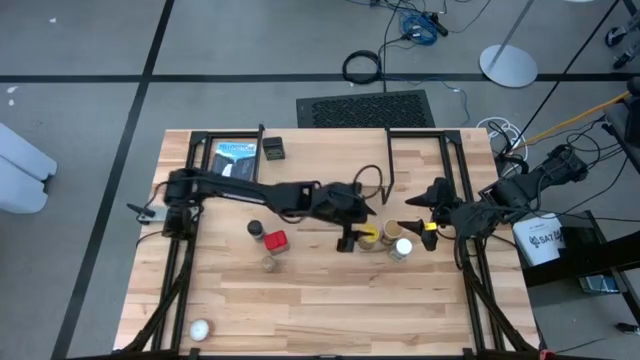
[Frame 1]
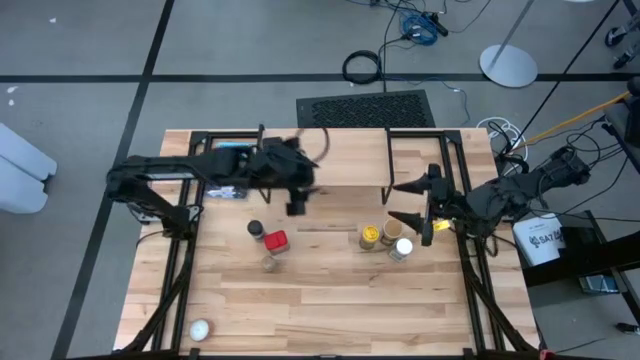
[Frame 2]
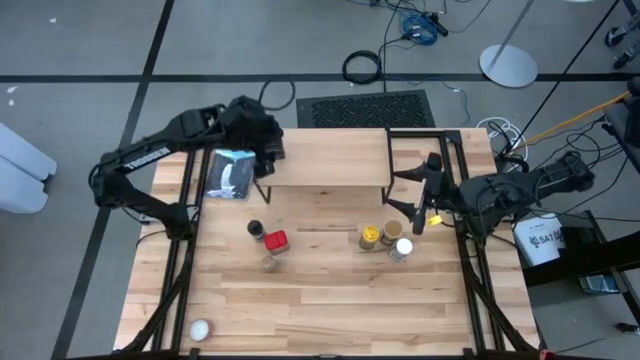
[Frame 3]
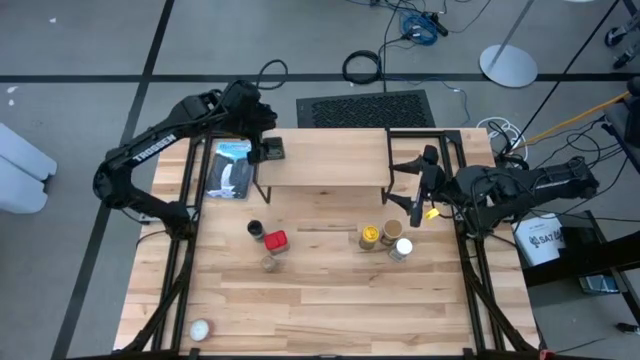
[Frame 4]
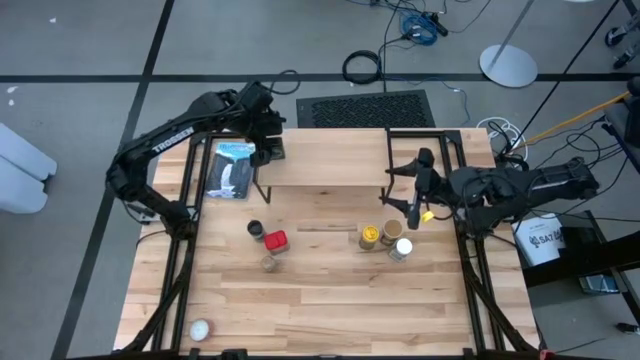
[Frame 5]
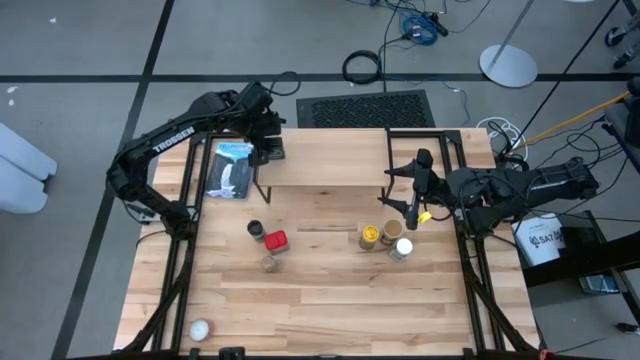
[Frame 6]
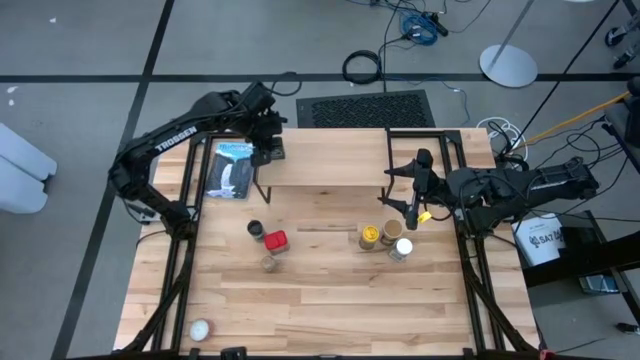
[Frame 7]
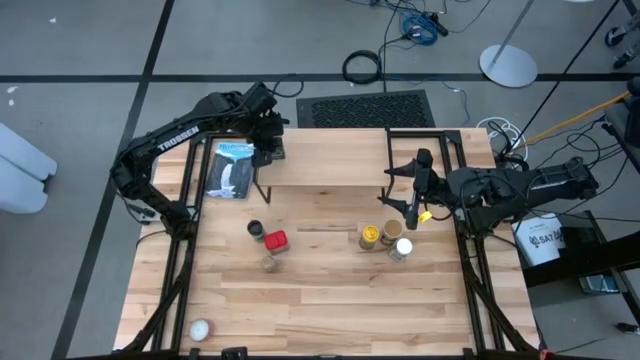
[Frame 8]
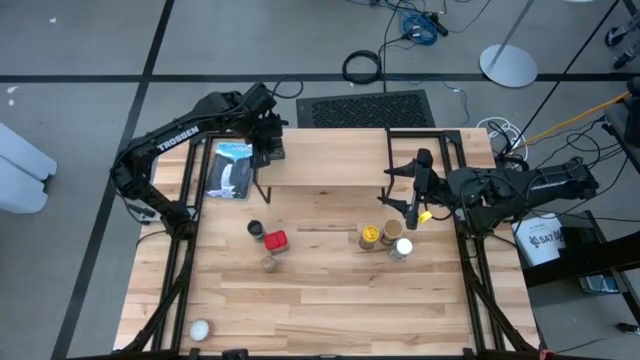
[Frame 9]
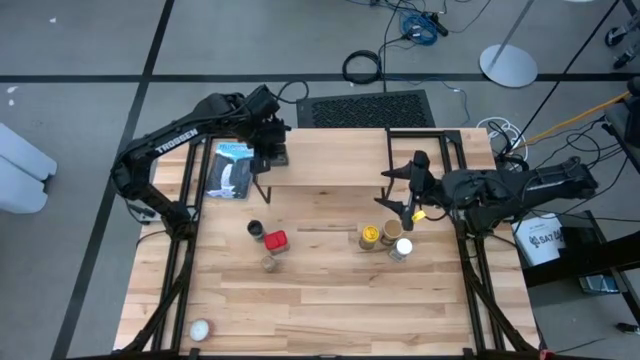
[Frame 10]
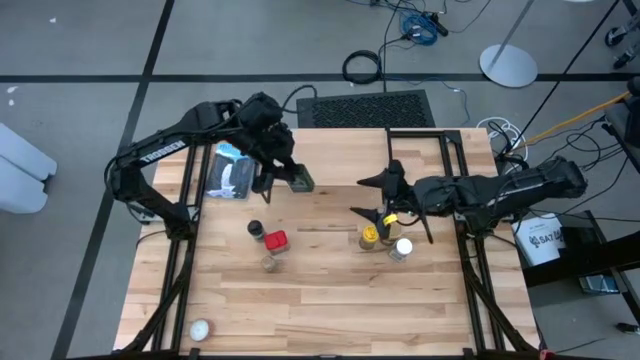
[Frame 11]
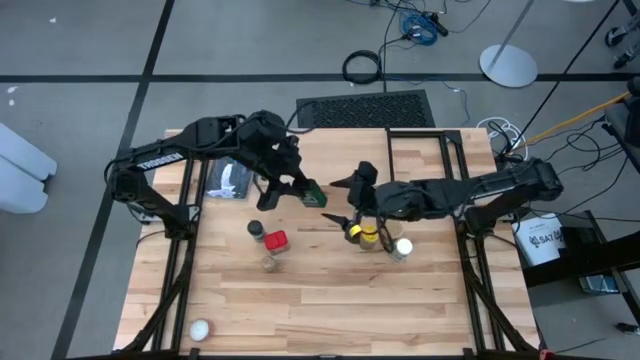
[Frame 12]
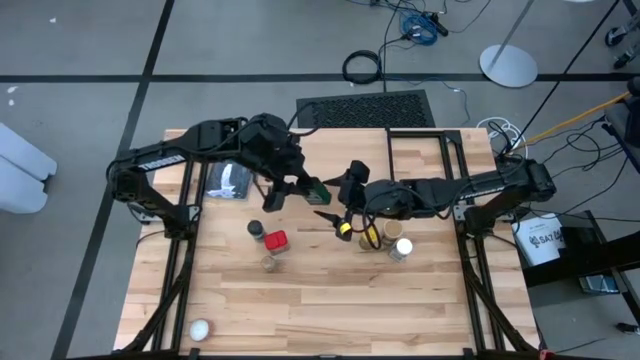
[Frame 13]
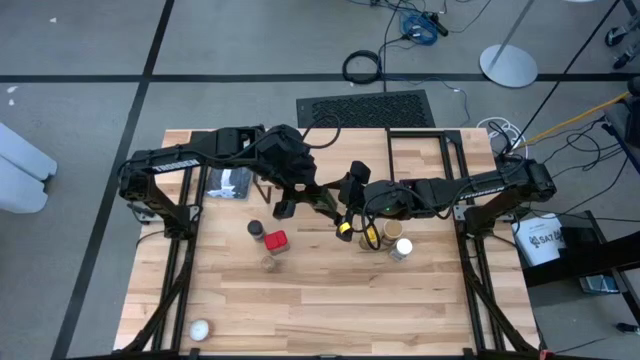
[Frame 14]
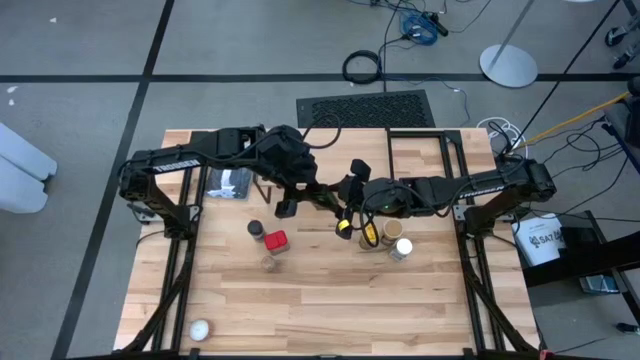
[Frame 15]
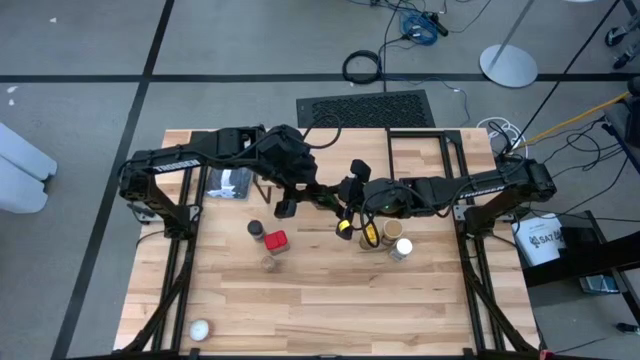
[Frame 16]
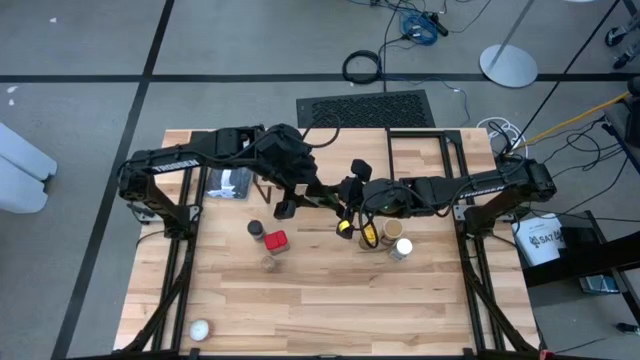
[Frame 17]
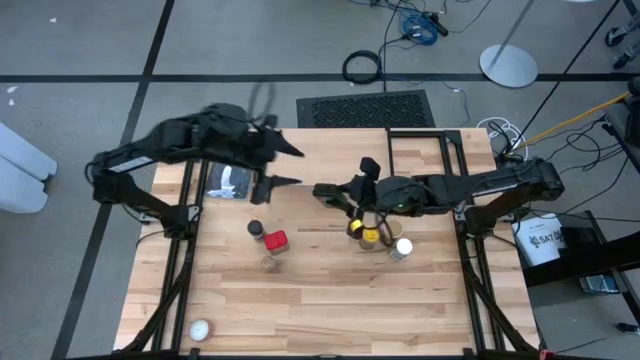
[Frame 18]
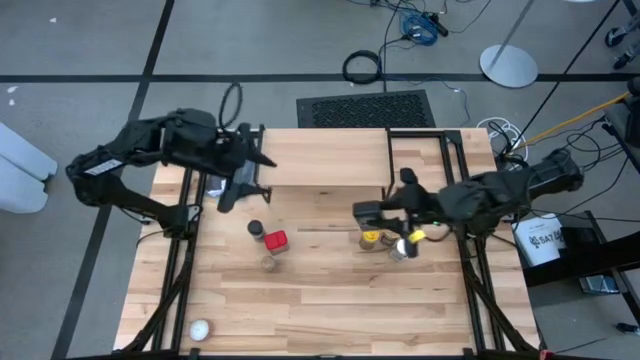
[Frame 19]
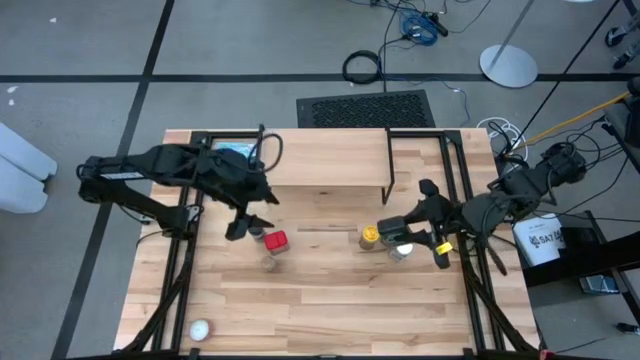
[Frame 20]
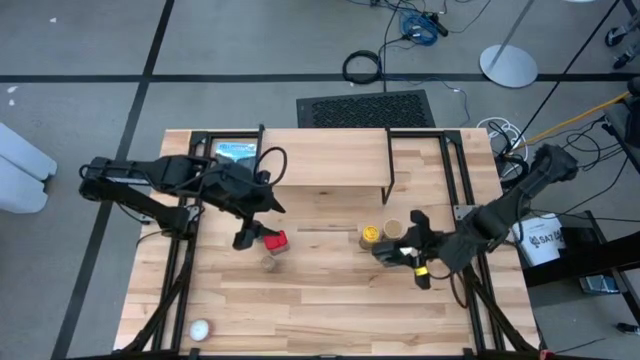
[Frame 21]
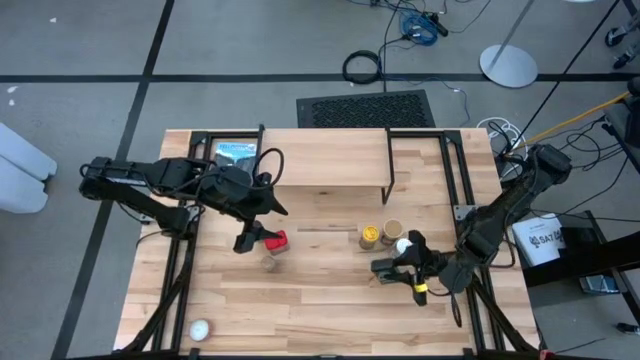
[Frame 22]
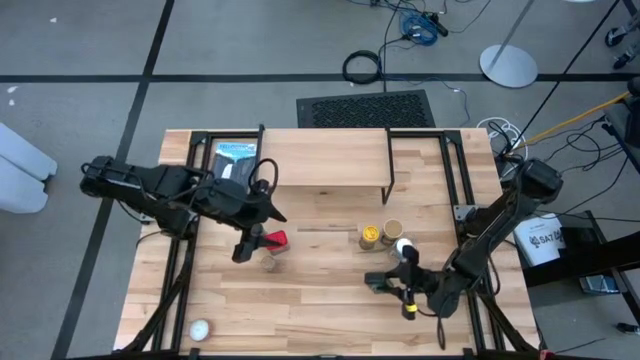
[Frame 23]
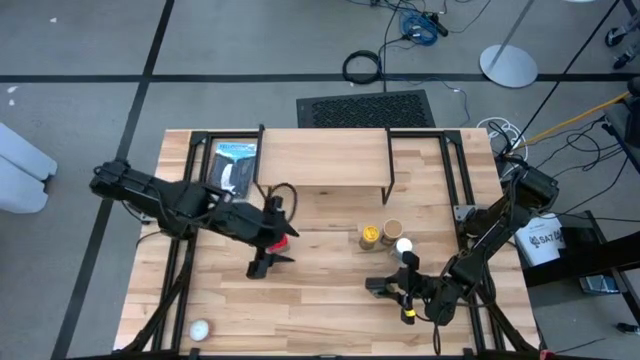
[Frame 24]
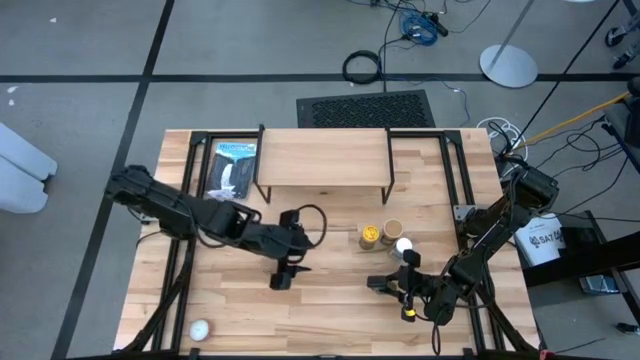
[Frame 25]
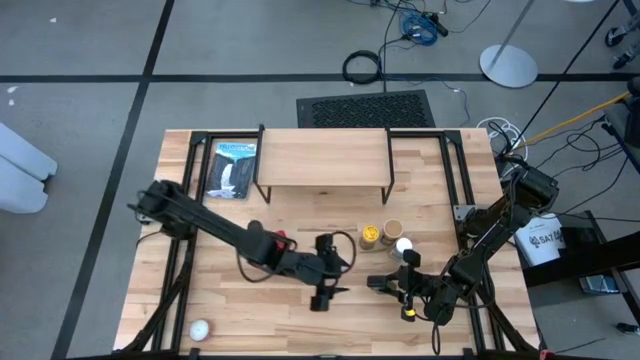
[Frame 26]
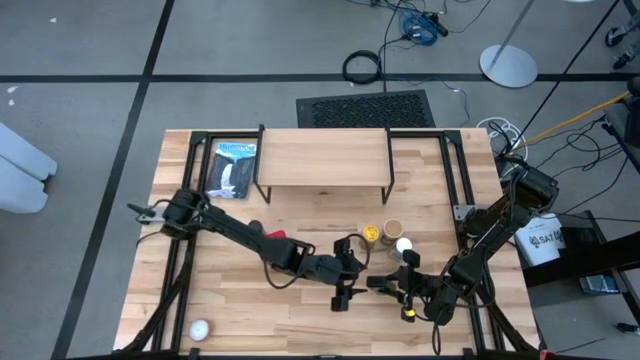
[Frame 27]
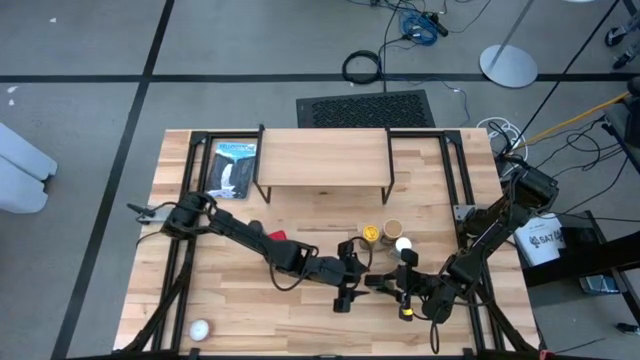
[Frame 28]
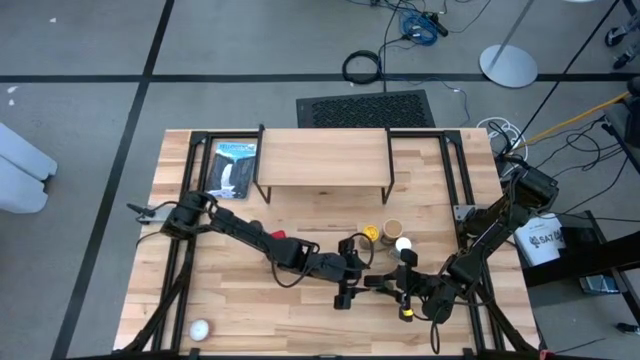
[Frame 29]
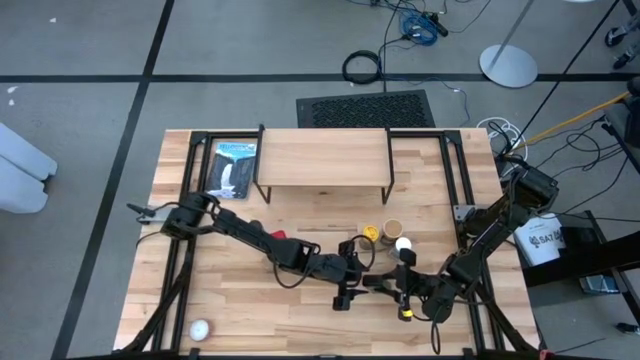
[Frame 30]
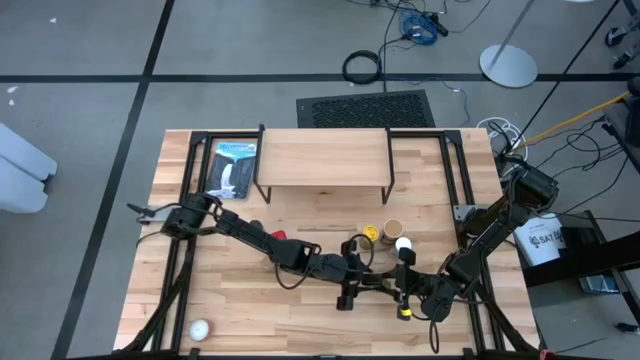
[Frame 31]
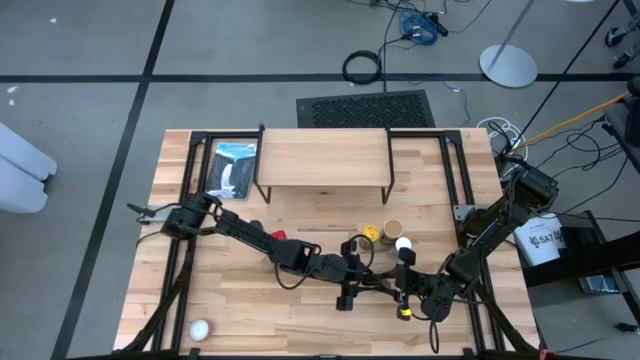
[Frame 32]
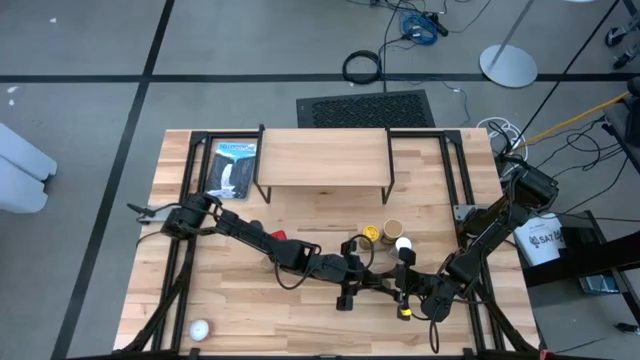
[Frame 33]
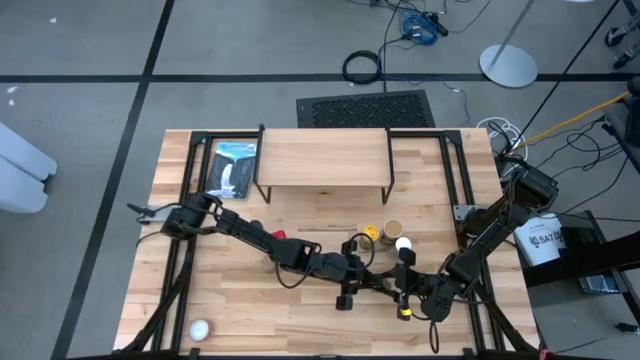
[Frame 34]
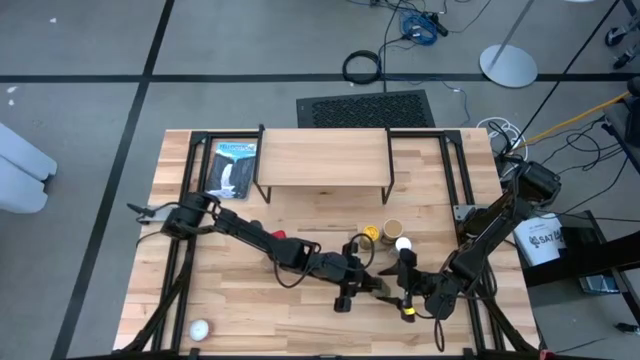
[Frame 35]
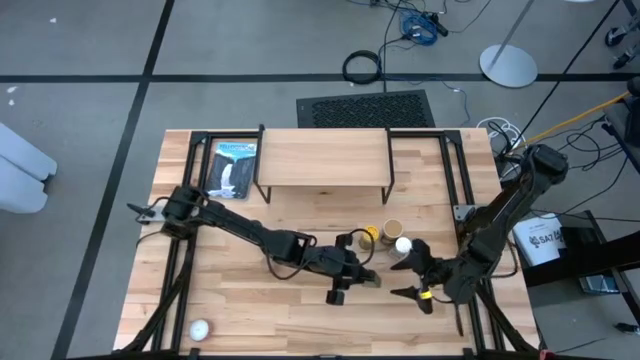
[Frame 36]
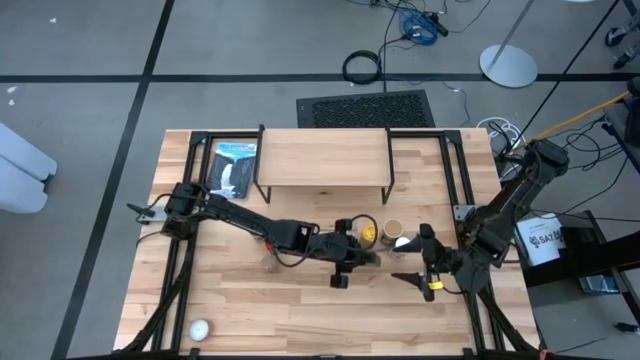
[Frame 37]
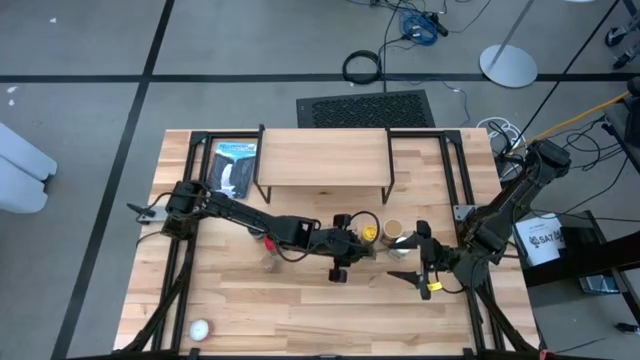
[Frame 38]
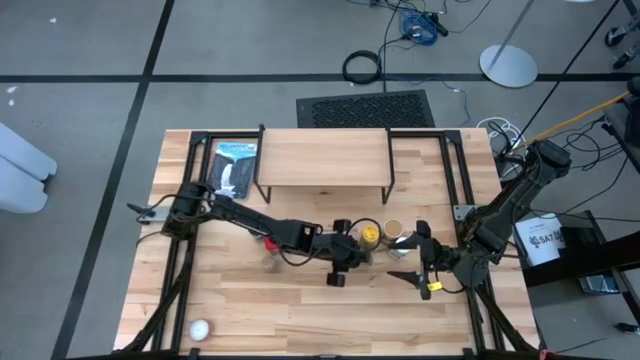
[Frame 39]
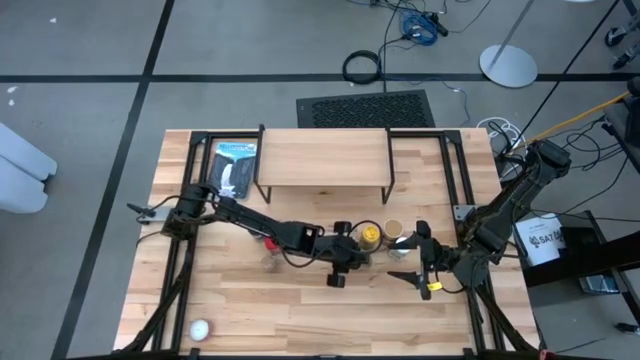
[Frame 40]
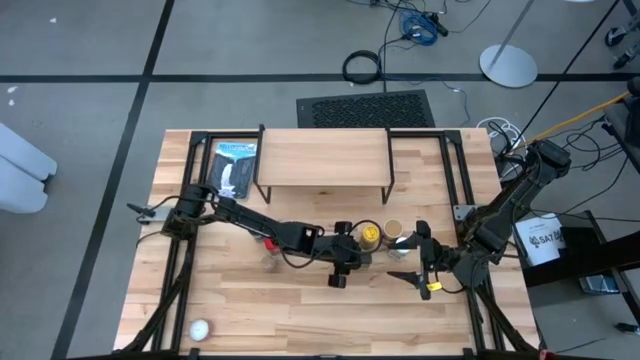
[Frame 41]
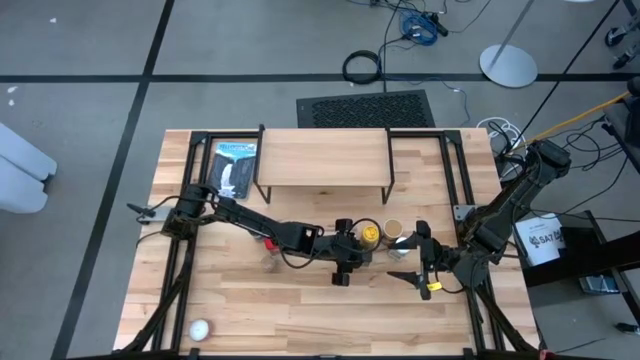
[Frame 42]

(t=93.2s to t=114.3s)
Task: Shelf spices
Remove the black seasoning can from the shelf
